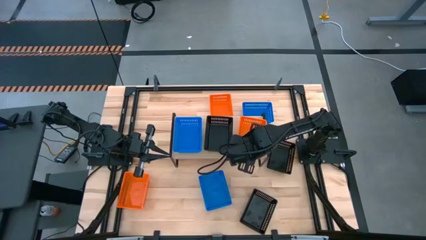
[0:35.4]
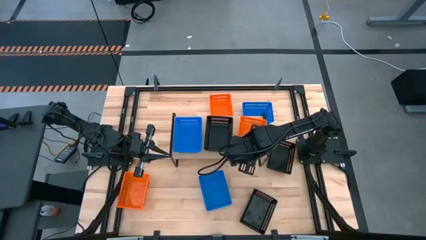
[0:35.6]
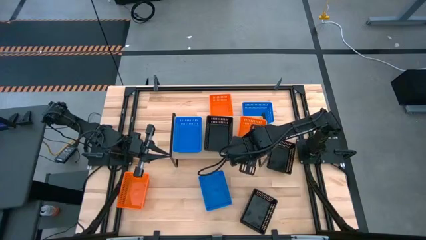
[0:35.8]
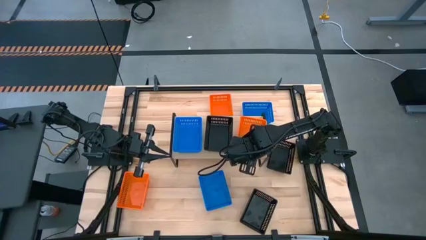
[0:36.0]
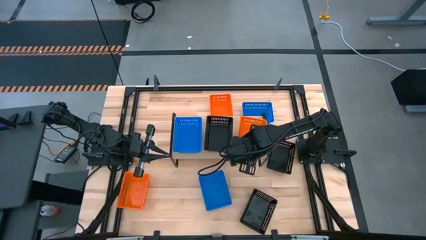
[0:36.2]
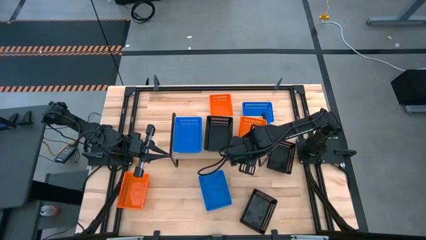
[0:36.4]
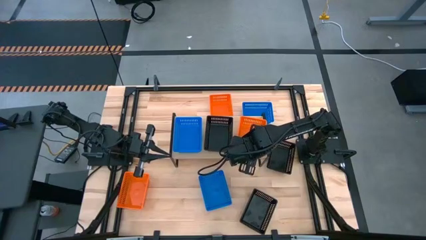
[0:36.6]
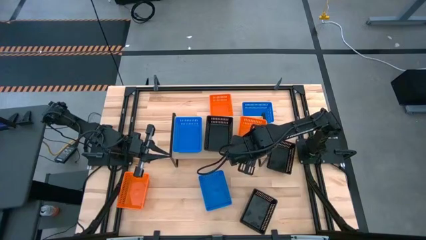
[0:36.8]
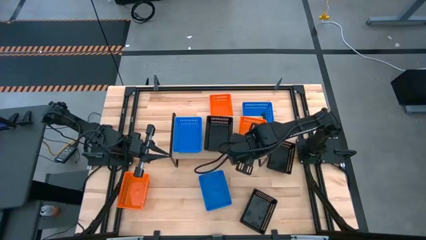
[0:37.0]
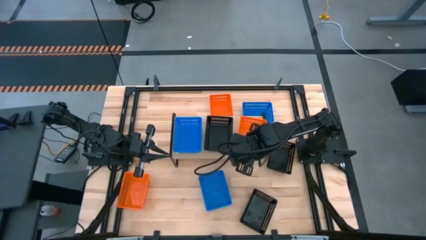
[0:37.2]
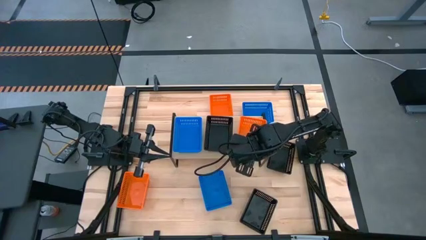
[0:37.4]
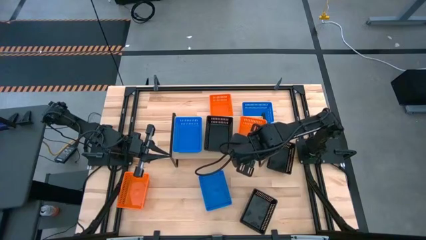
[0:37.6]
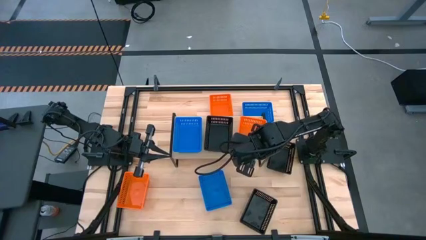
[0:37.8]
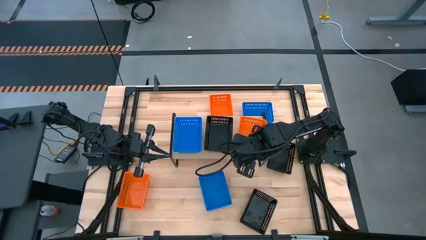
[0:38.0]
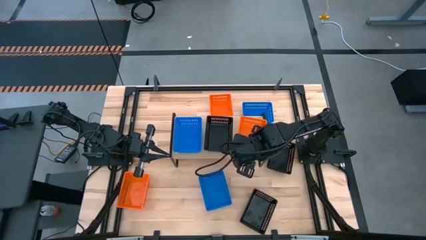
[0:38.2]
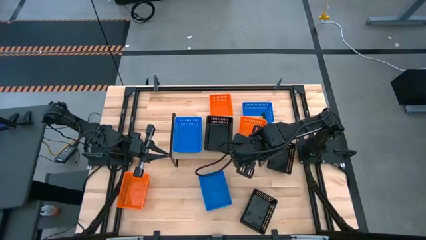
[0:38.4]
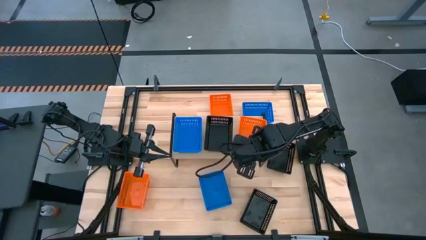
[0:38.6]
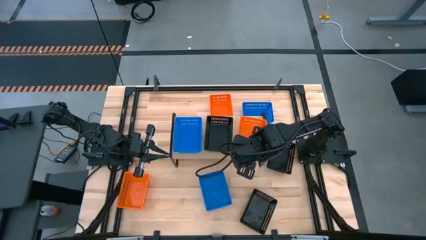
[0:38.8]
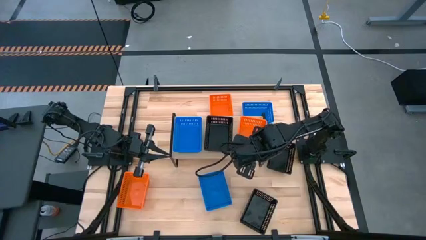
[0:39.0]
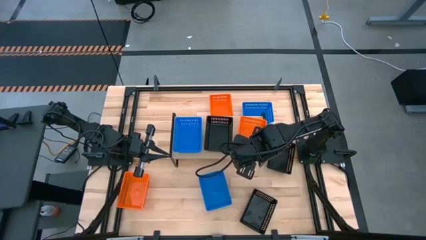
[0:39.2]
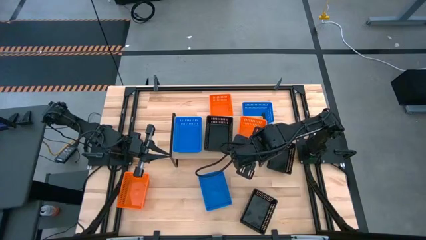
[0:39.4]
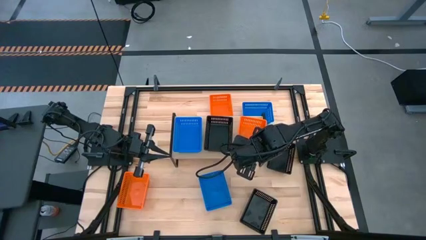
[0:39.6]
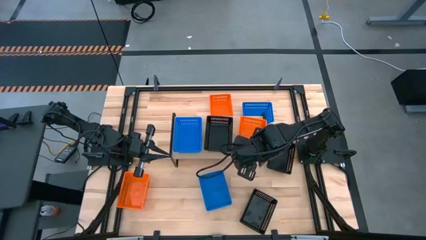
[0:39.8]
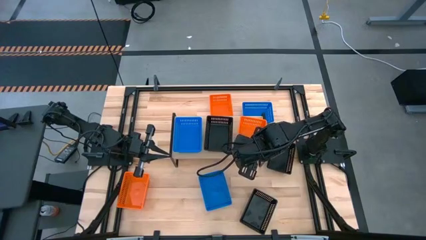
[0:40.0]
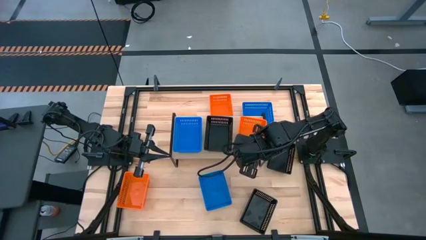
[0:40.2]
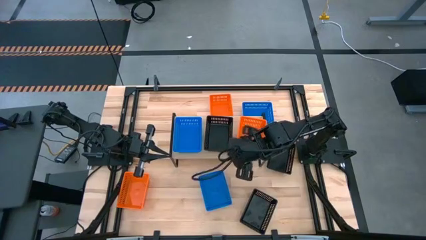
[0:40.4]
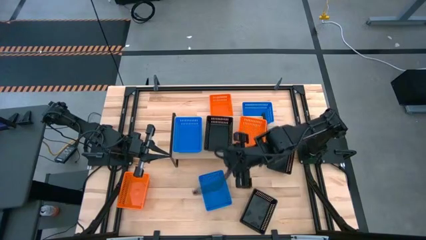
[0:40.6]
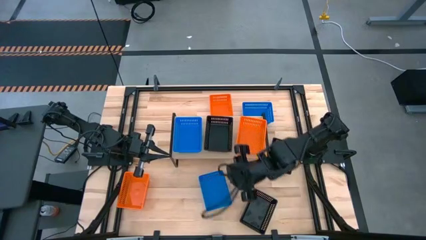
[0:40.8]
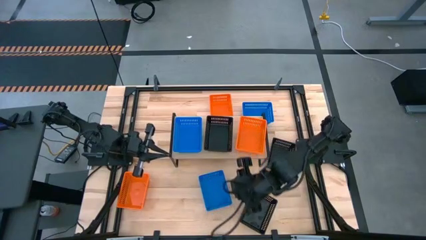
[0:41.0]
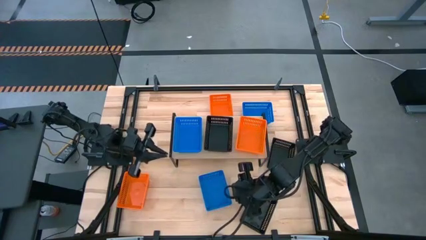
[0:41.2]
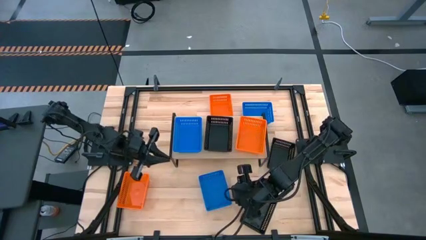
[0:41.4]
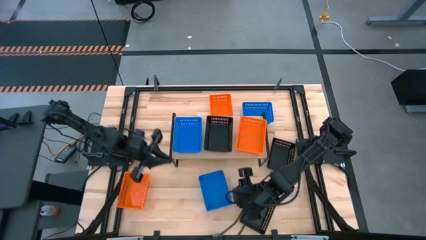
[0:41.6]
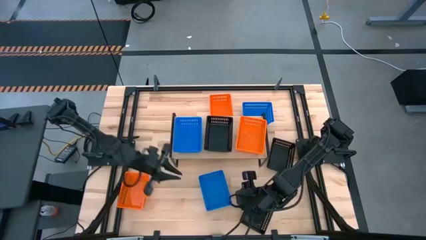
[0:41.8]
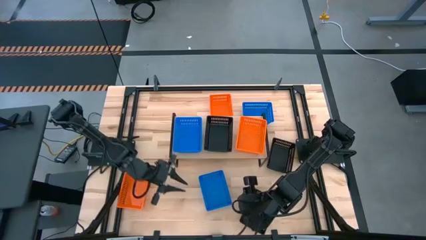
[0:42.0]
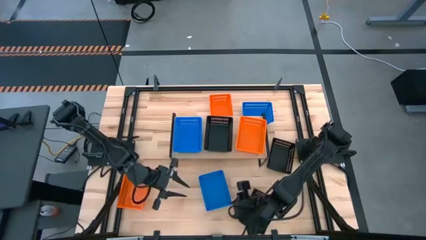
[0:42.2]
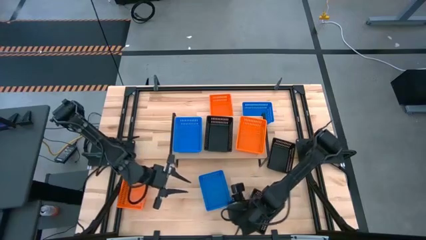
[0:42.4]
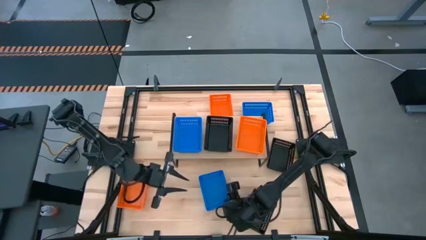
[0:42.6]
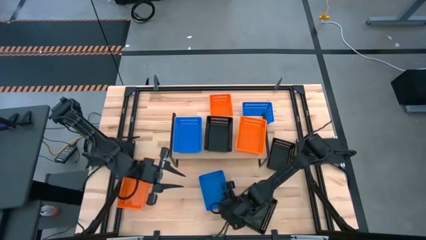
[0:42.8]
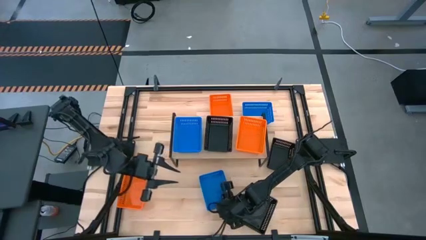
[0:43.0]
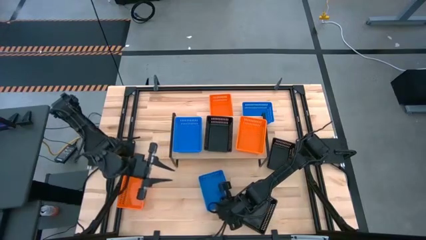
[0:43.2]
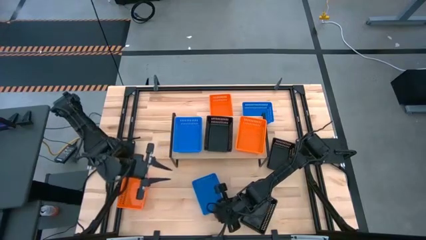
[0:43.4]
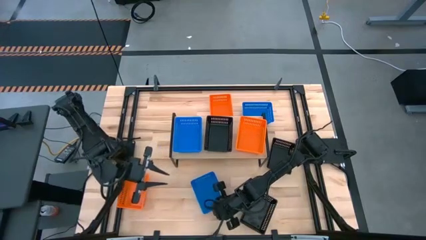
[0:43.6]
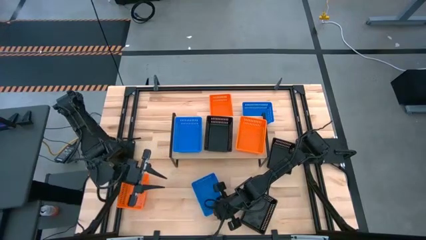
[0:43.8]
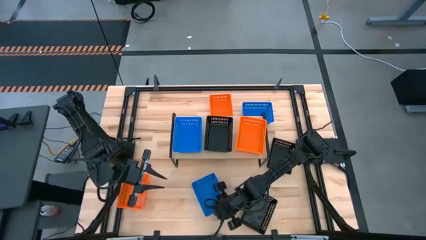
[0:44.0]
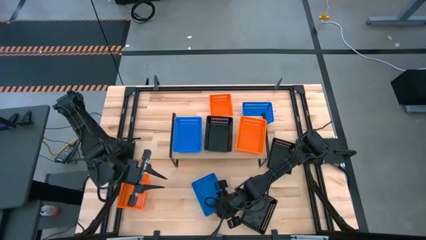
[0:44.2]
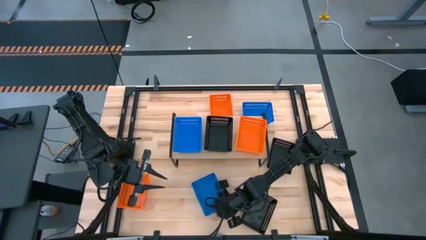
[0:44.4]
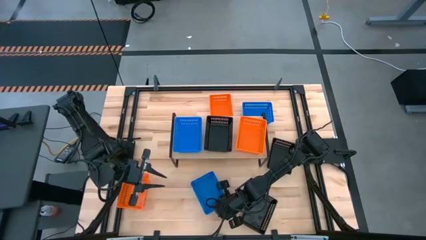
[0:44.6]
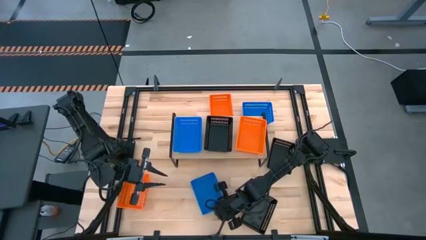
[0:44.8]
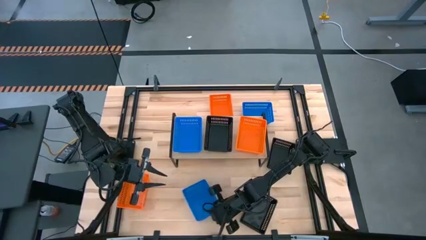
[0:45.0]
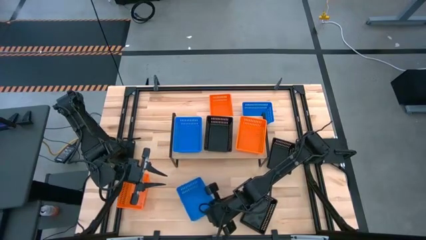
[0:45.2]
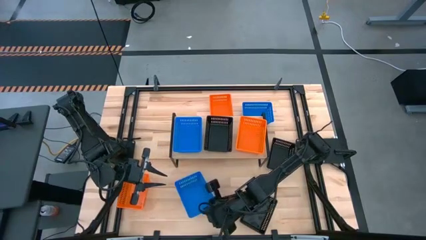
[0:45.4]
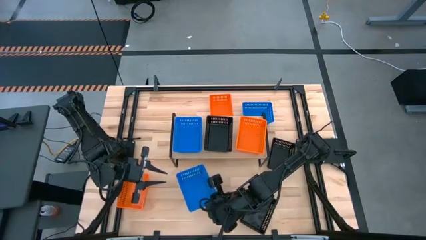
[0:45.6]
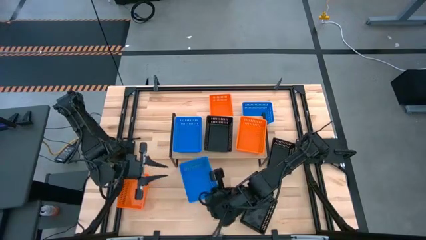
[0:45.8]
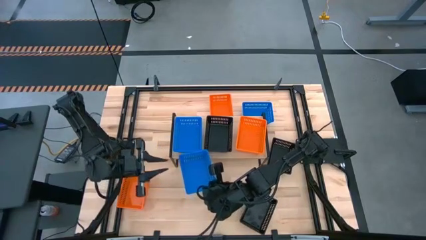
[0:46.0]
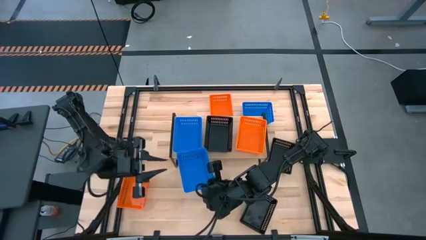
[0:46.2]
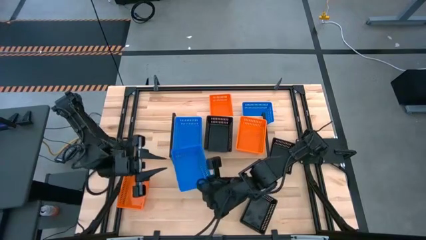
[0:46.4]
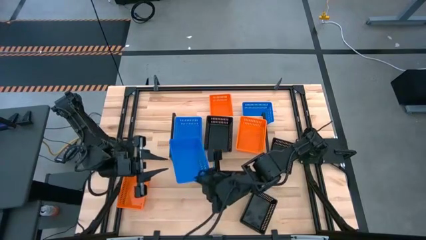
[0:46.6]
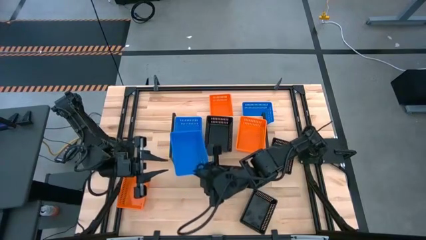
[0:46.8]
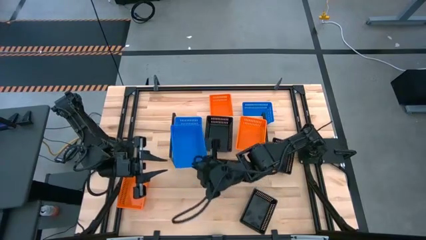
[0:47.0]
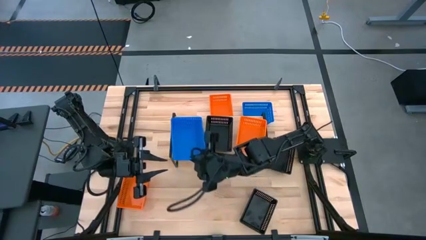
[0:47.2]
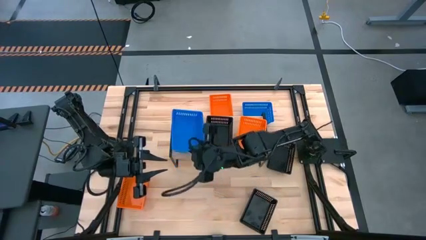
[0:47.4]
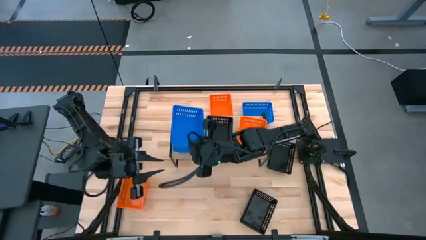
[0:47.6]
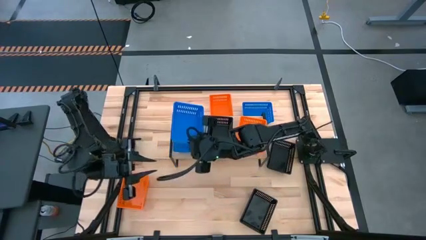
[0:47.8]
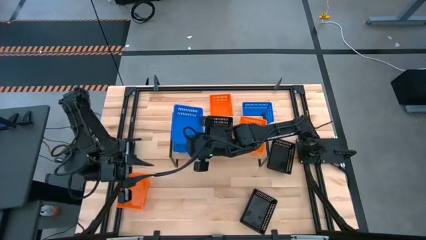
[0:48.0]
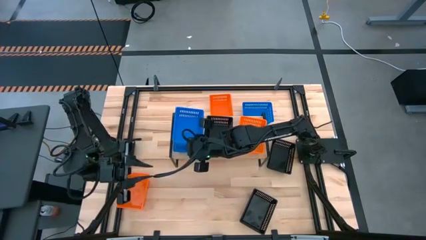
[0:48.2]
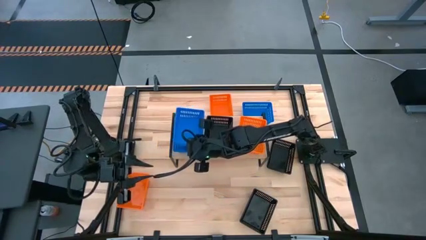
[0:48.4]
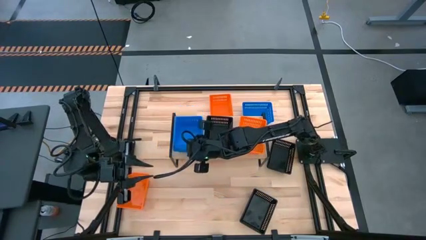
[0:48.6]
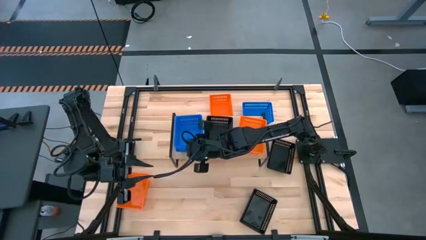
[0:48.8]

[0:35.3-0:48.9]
Task: Stack baskets on shelf by color
Stack the bottom blue basket on the blue basket on the shelf
